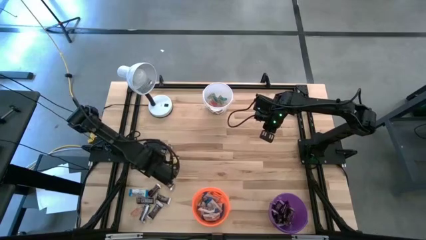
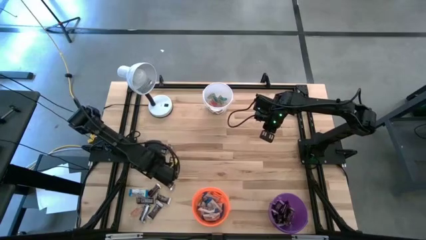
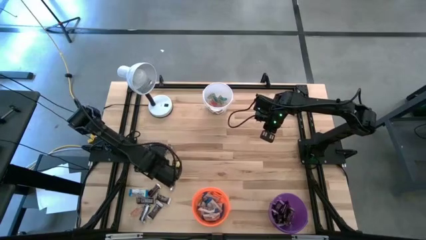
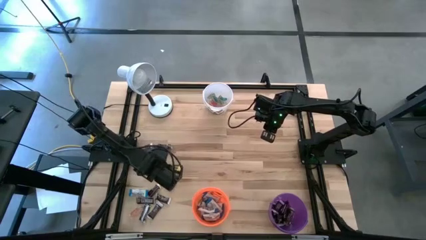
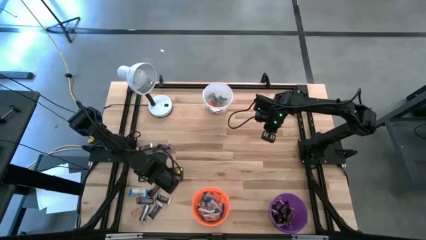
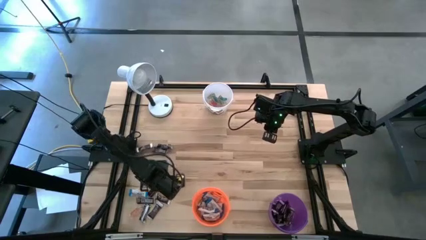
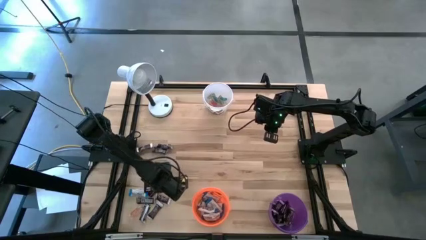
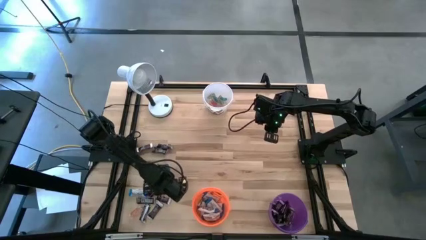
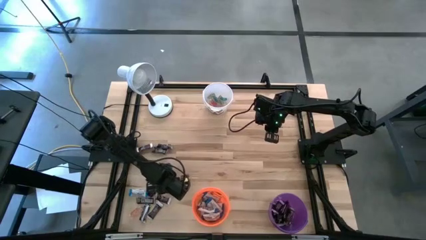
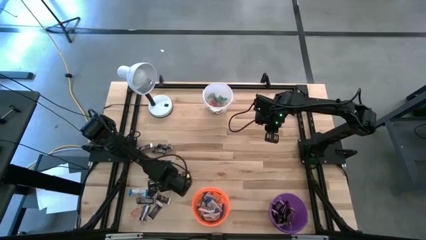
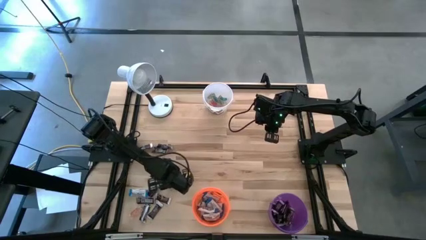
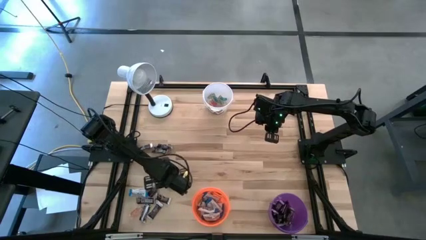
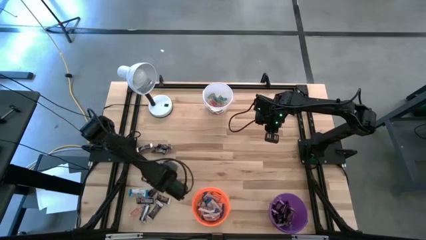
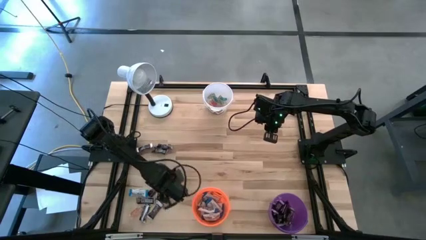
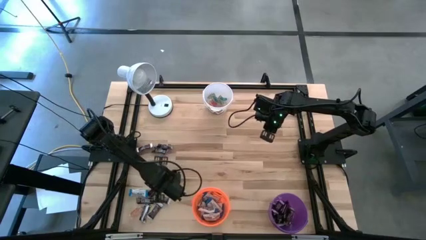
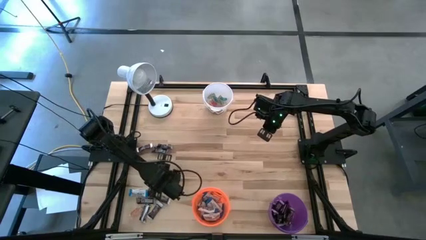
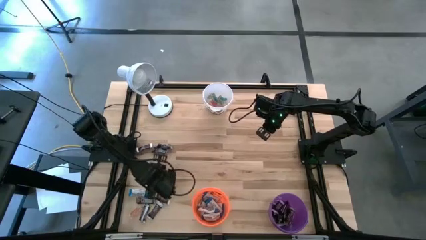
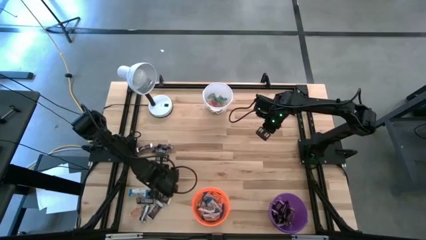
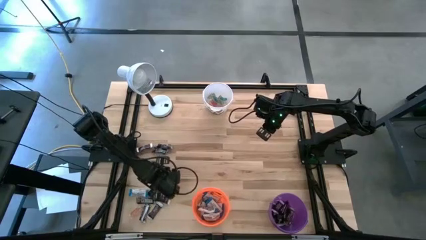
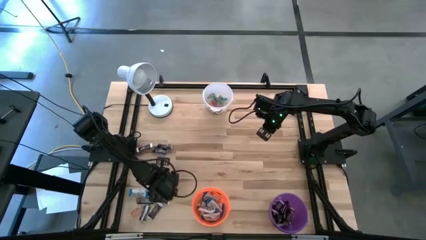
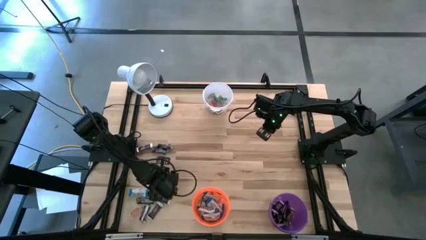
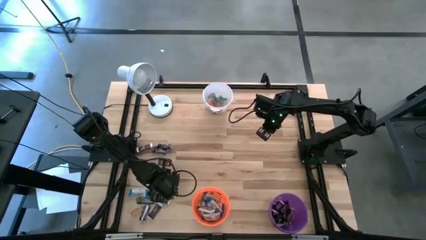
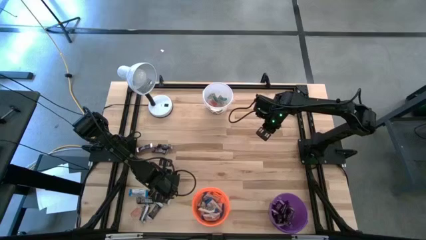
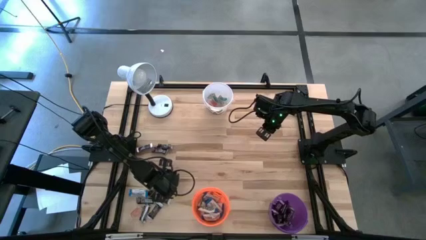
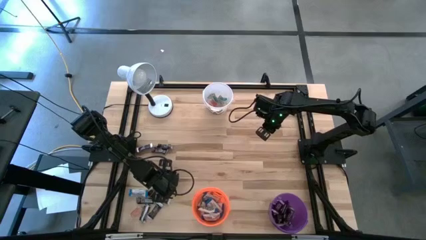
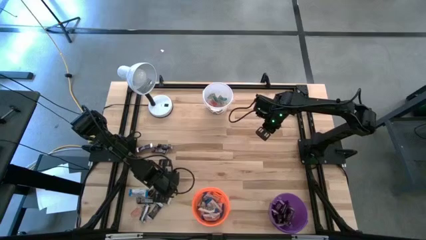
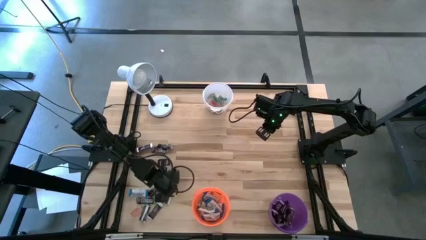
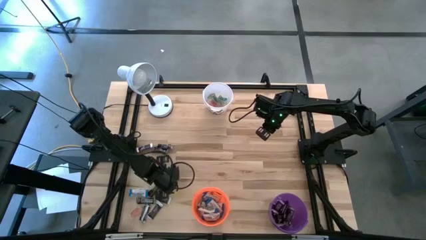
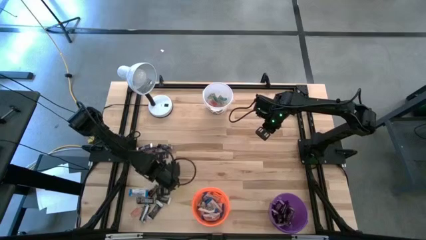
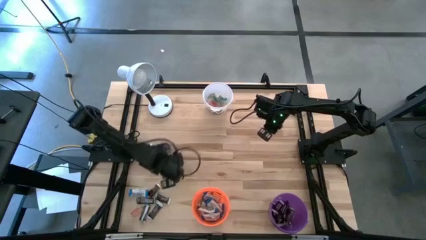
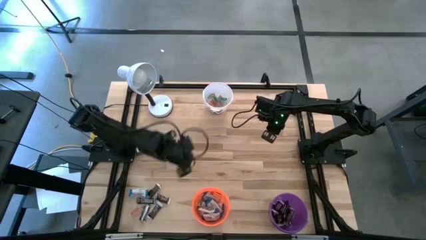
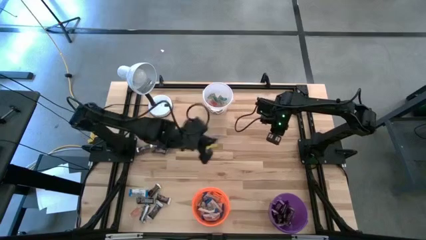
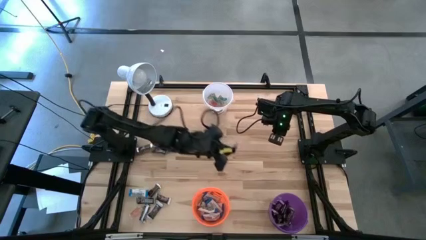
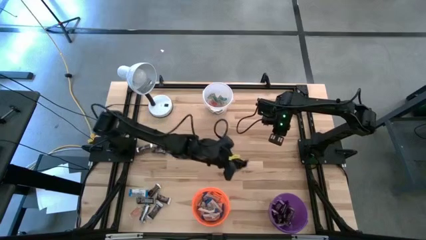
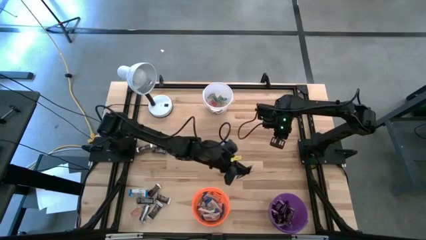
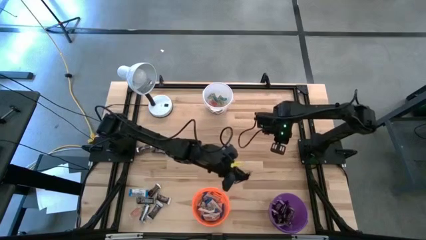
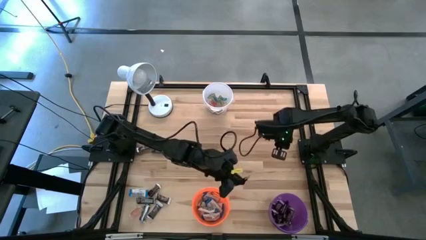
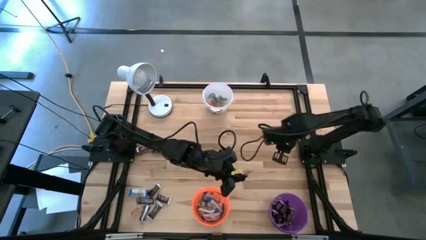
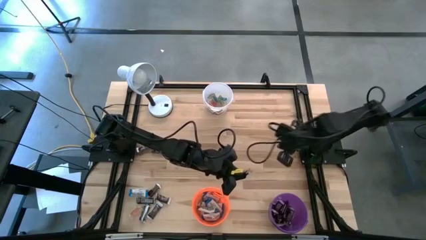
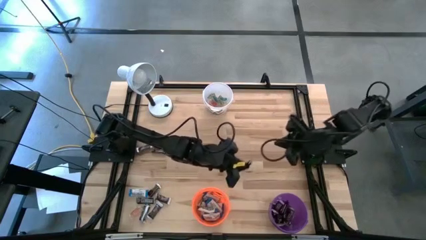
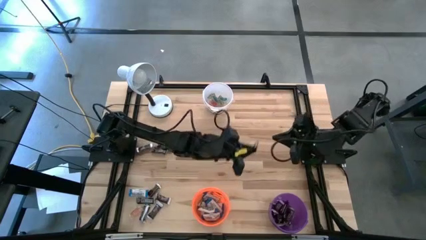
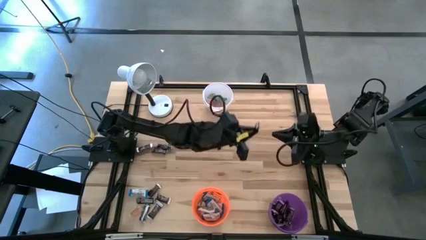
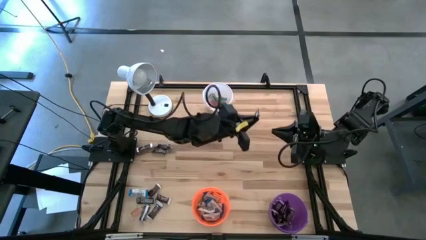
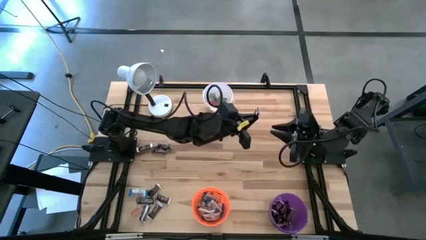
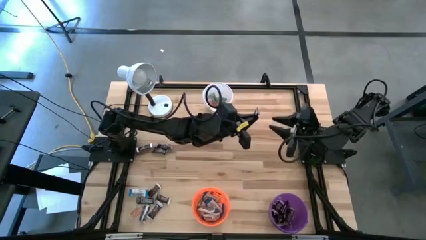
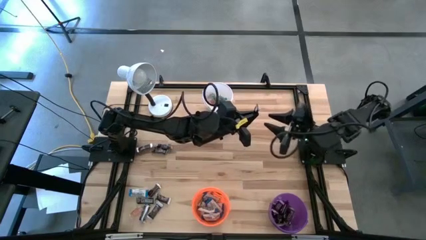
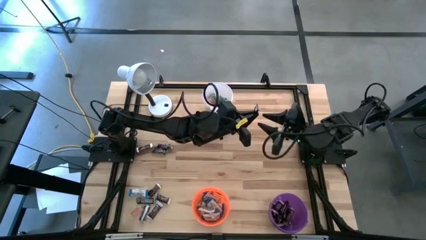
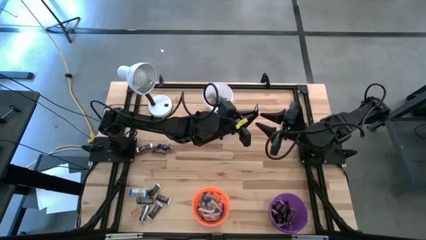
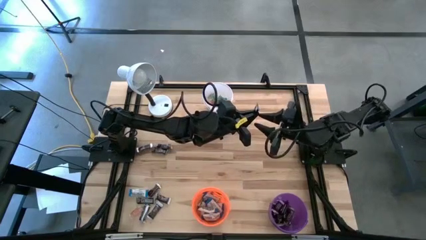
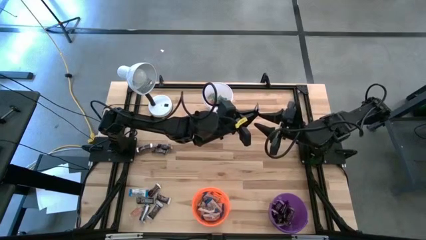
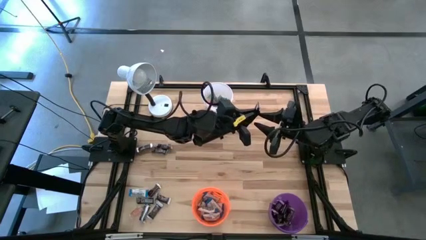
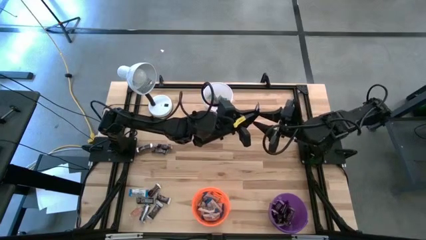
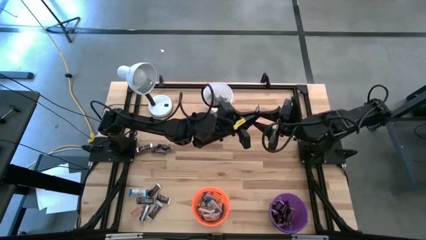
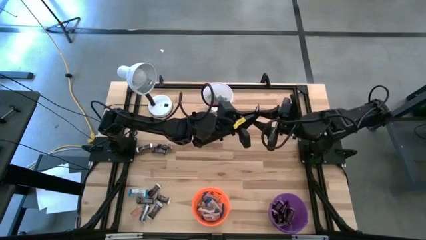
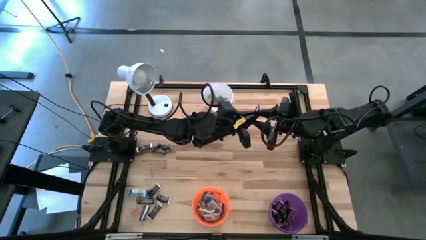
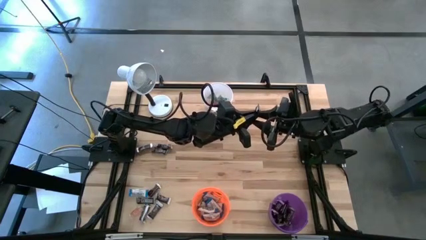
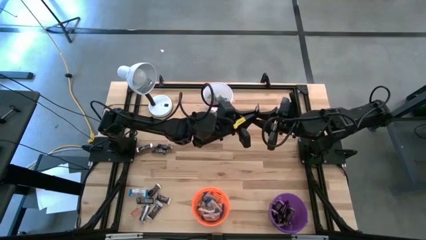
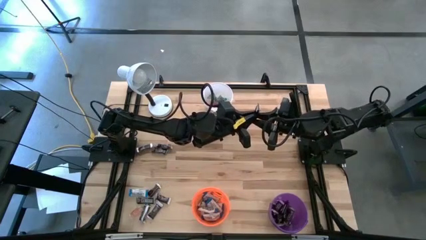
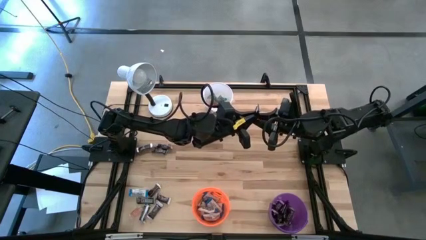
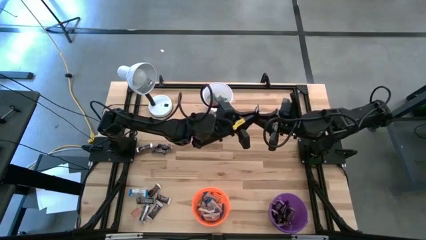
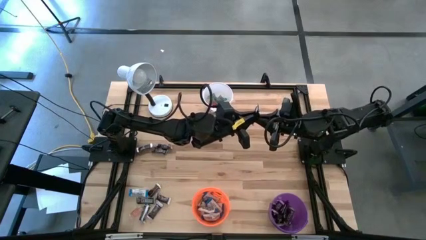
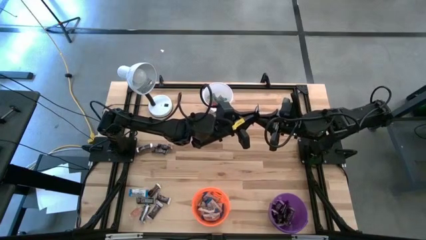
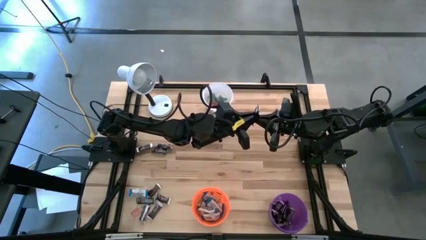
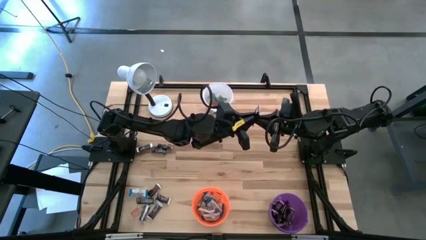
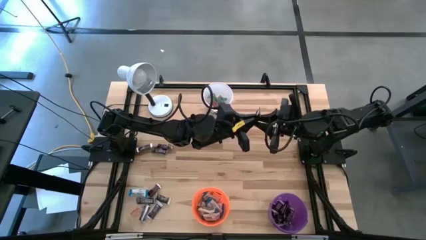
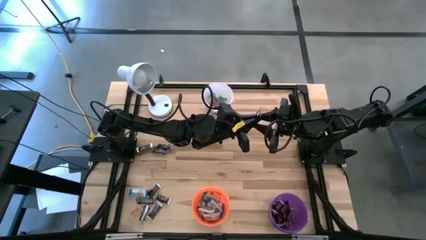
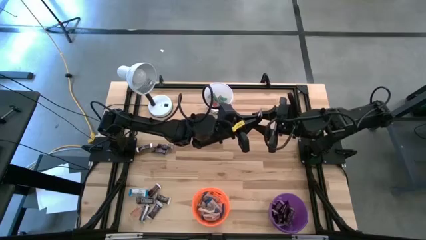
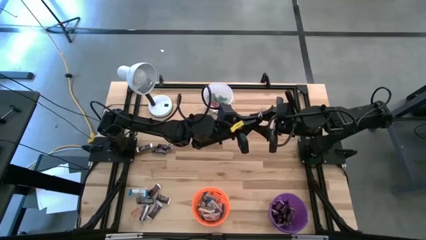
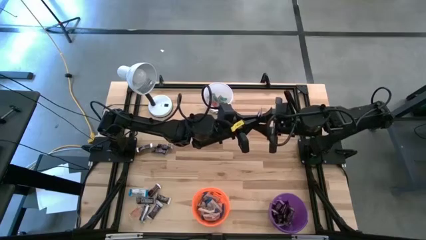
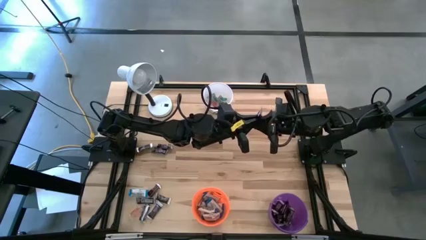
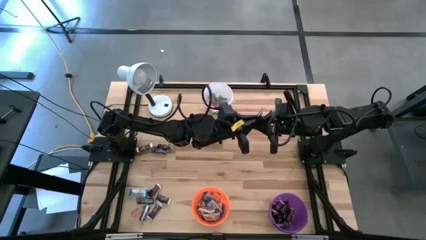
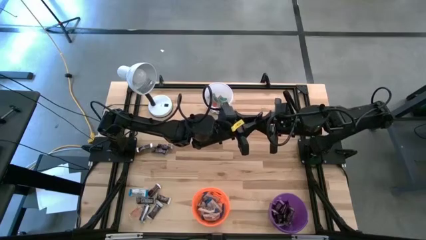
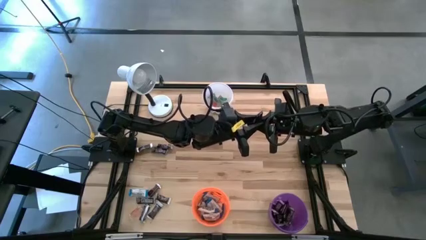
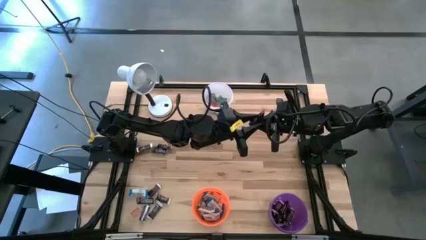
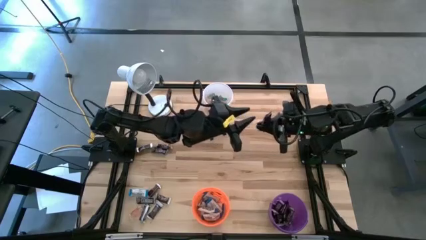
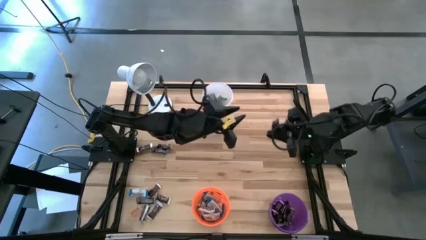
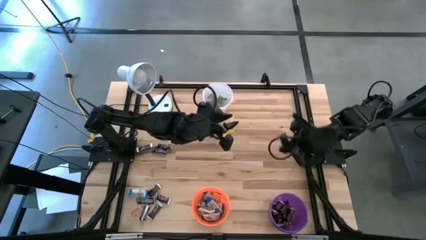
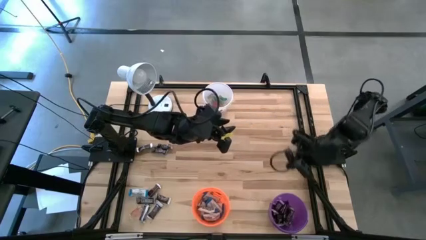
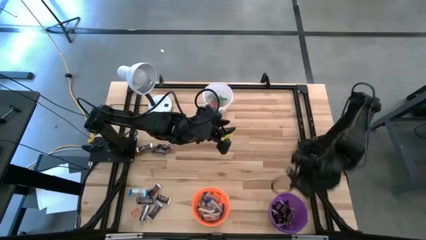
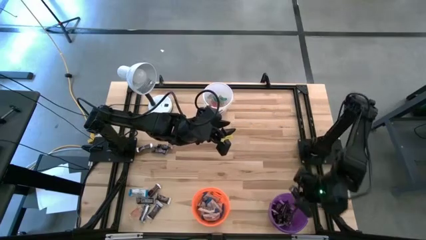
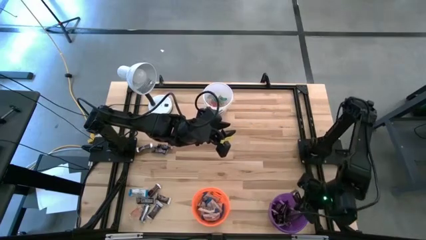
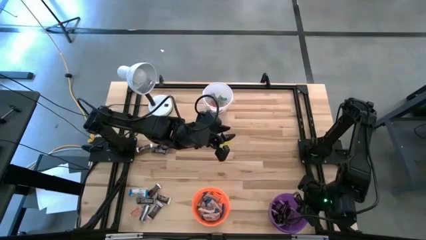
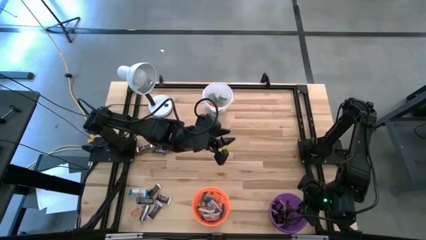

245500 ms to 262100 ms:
Task: Organize candy in baskets
Put the dark brown chocolate bar into the dark purple bucket
